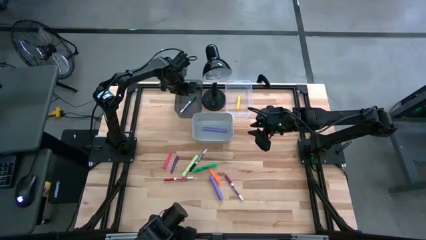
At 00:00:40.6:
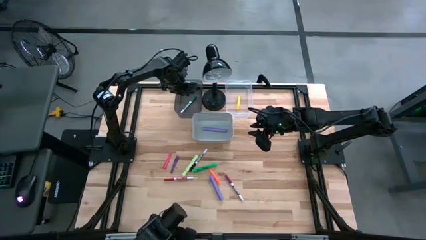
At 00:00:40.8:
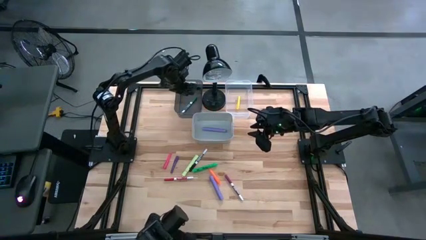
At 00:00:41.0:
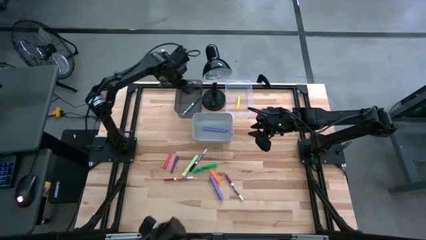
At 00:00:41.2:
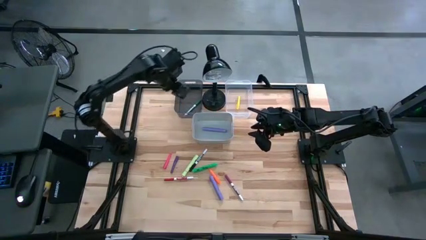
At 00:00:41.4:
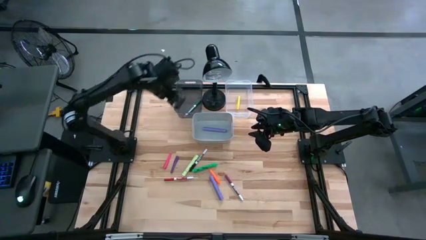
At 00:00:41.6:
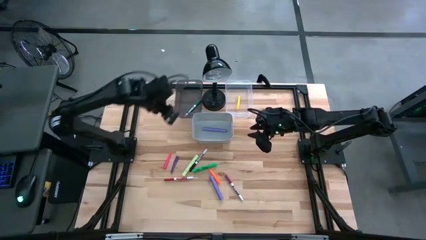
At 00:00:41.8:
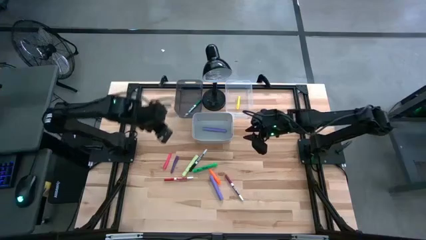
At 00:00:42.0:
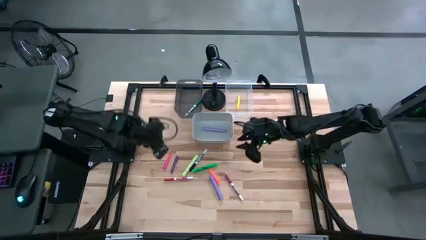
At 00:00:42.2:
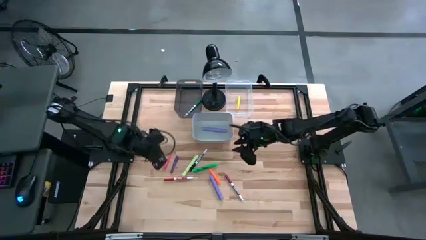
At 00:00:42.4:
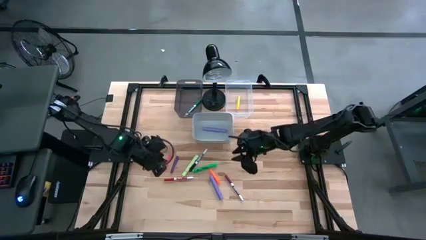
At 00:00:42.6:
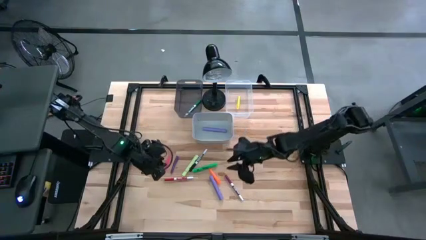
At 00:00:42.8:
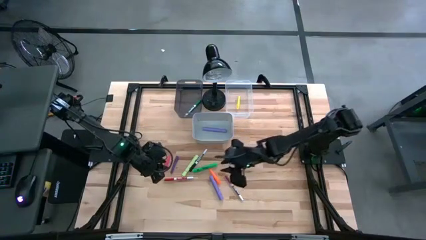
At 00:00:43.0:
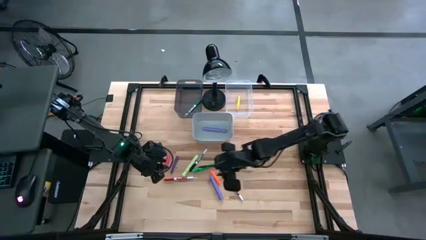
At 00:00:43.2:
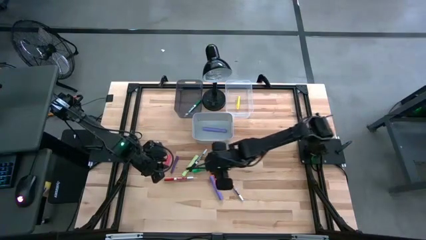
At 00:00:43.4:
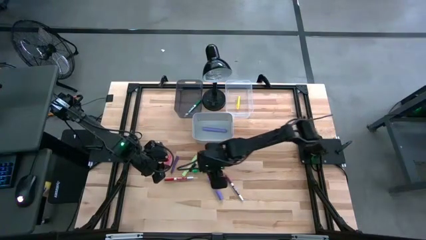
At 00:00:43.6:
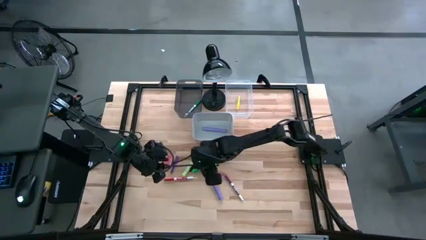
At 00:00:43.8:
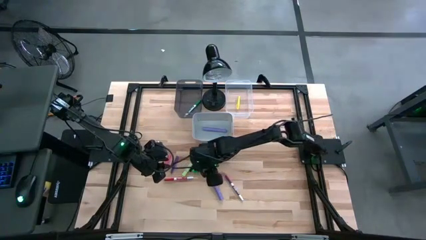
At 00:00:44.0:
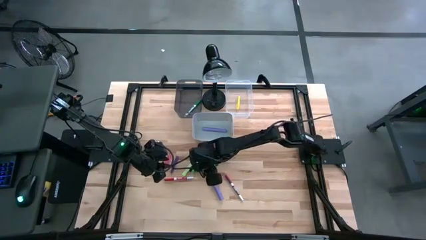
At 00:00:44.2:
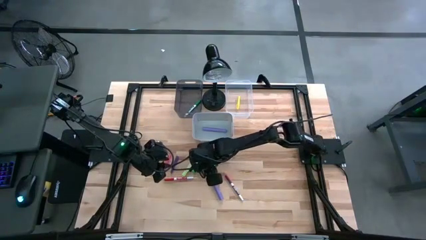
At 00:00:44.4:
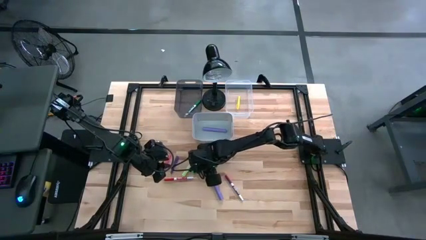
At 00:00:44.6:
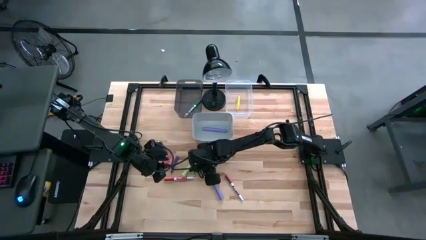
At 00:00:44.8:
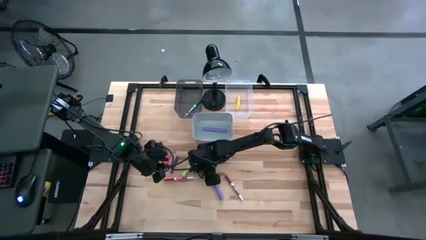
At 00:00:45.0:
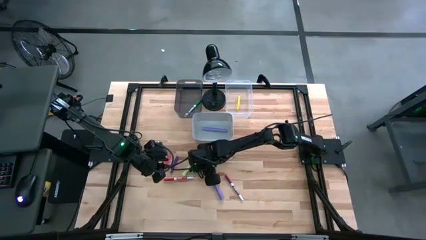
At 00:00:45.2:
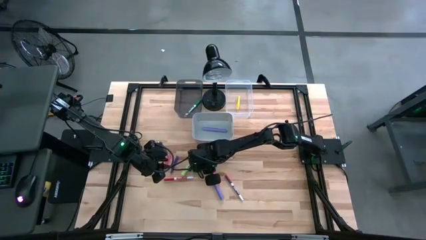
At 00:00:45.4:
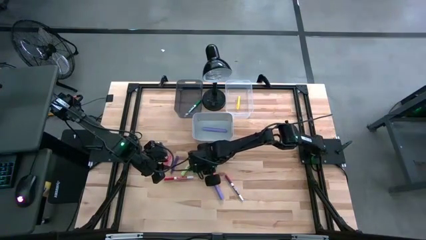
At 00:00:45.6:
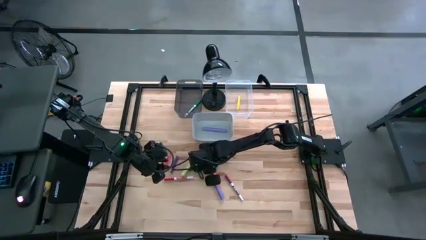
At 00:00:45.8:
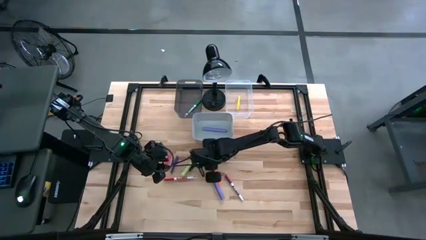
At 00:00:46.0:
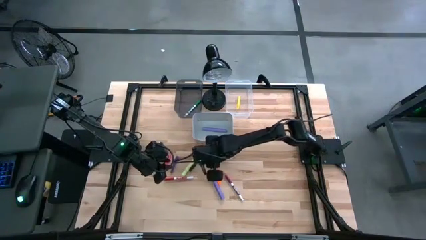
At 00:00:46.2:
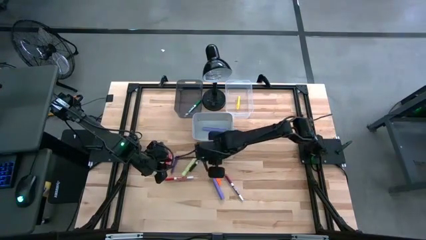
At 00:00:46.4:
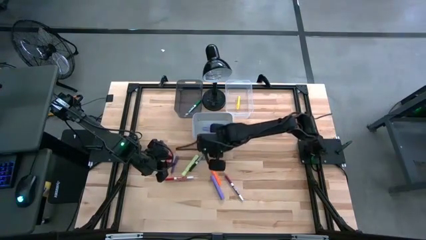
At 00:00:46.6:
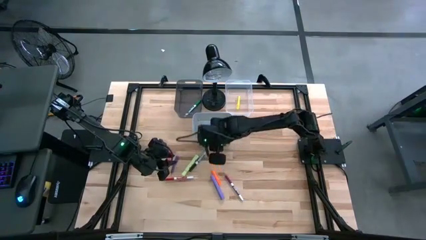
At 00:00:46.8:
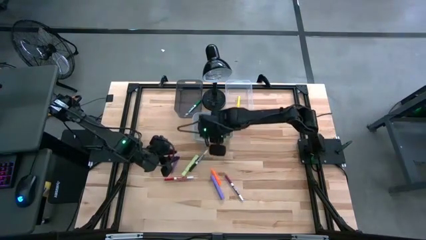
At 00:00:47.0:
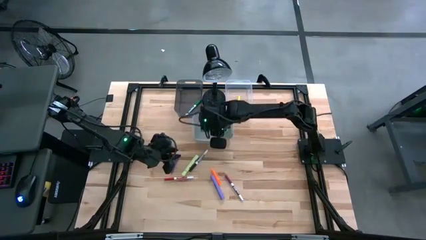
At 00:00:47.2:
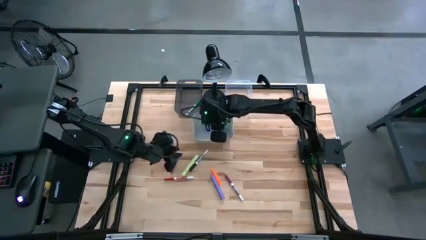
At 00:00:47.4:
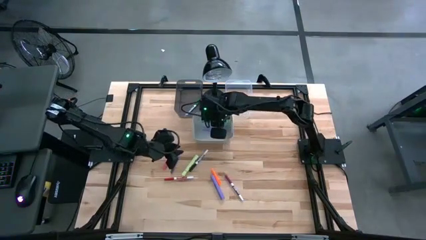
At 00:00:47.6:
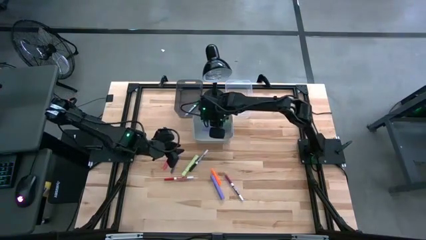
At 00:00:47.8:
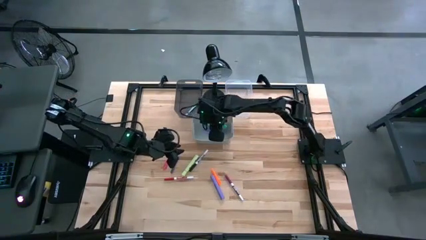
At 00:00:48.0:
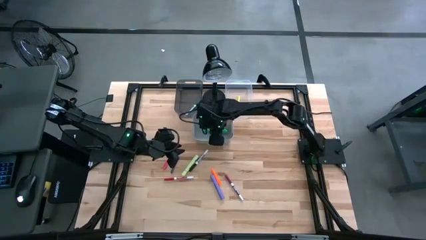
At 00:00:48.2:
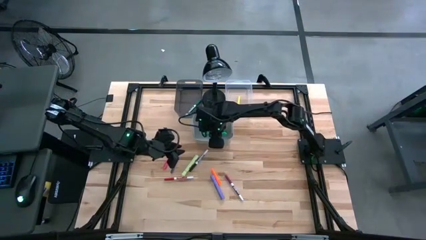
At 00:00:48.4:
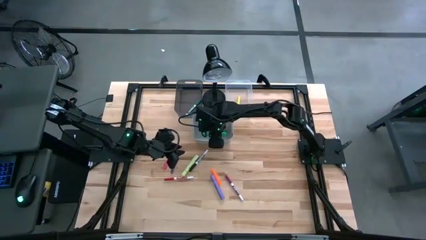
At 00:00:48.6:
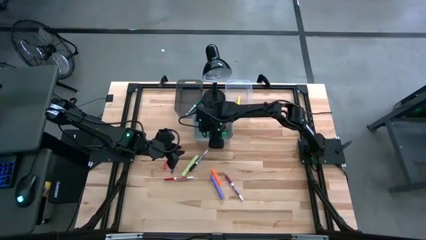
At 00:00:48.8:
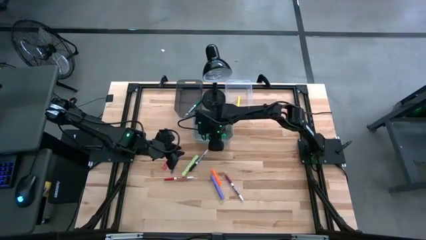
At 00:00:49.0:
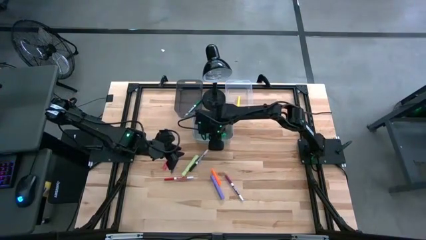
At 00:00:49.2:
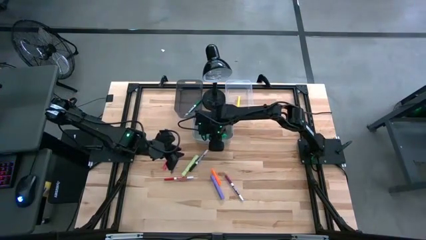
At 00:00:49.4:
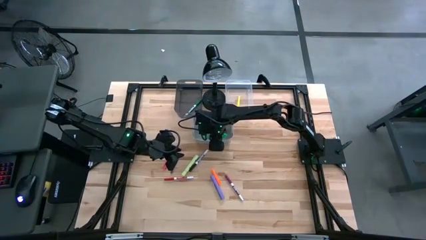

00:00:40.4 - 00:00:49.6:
Task: Pick & Place Markers
Put the large green marker into the gray bin
